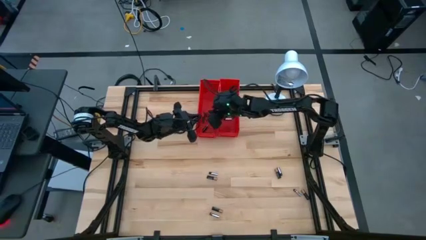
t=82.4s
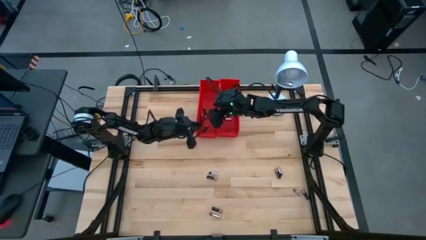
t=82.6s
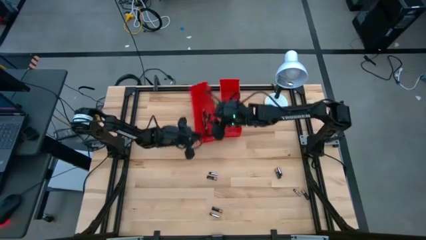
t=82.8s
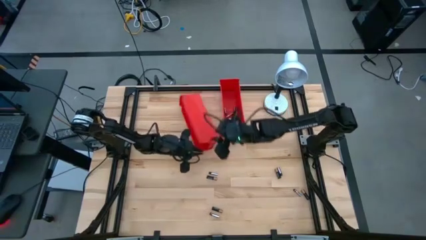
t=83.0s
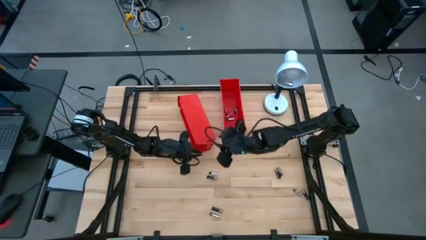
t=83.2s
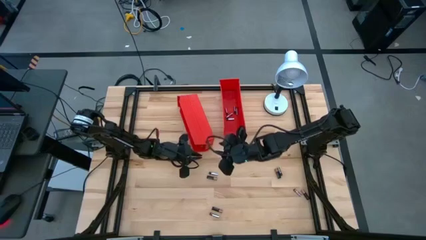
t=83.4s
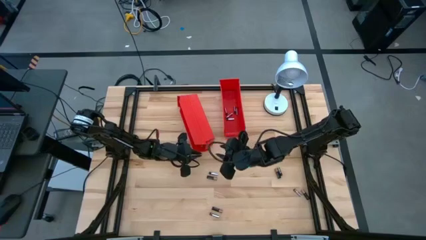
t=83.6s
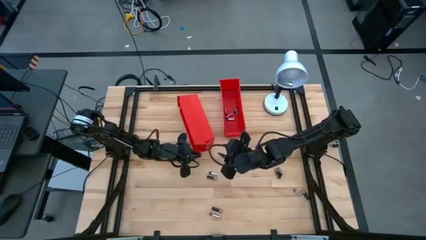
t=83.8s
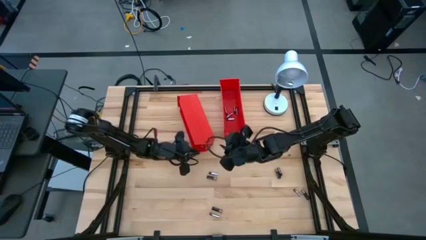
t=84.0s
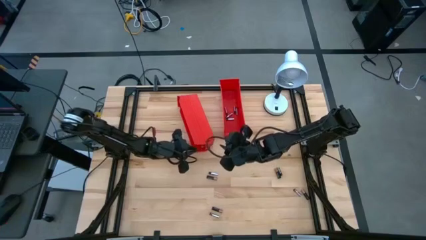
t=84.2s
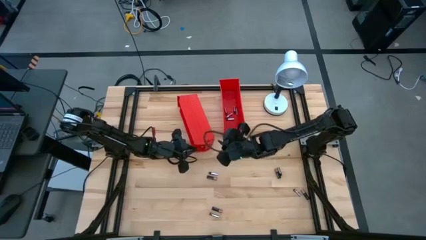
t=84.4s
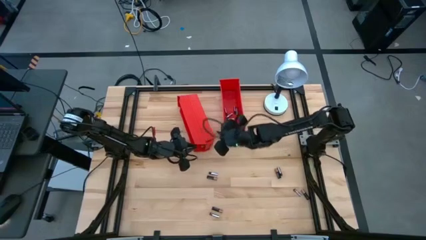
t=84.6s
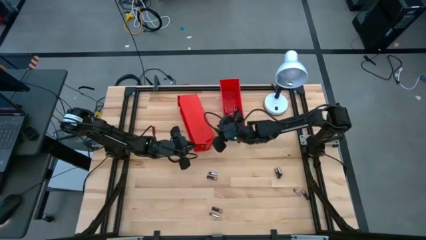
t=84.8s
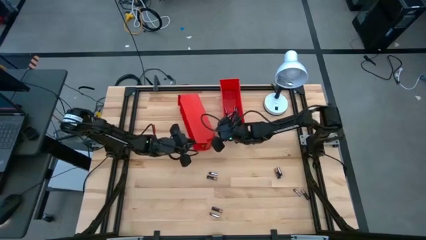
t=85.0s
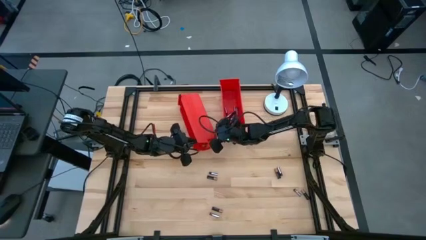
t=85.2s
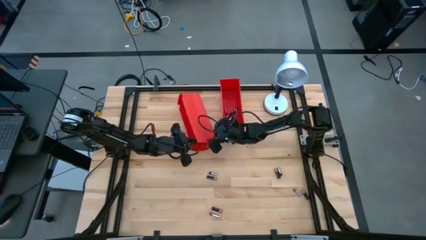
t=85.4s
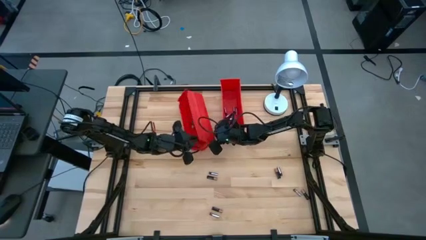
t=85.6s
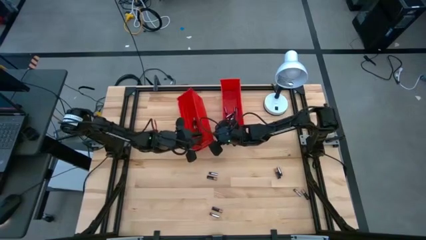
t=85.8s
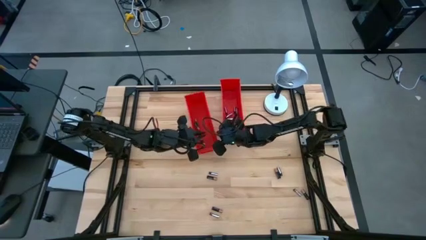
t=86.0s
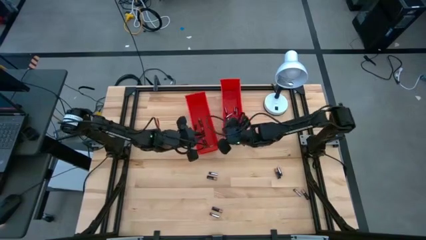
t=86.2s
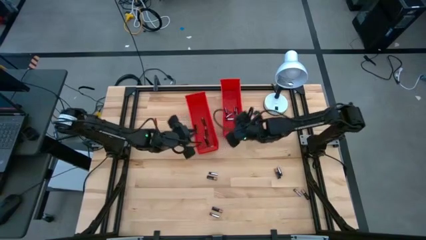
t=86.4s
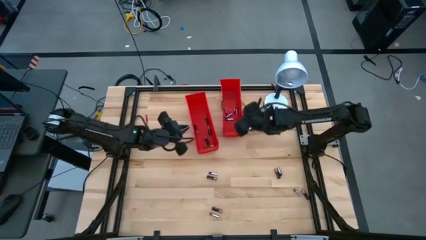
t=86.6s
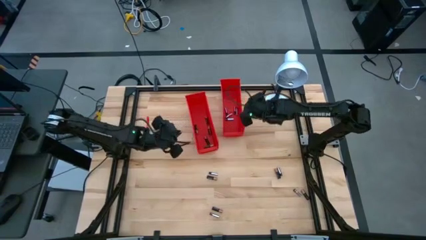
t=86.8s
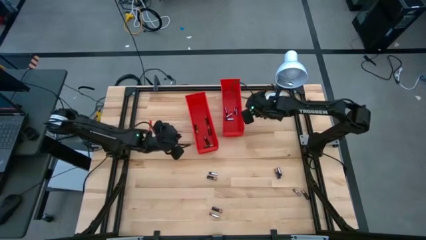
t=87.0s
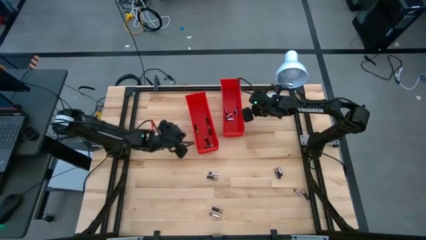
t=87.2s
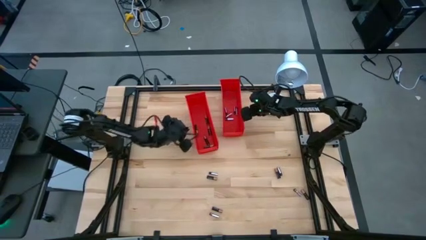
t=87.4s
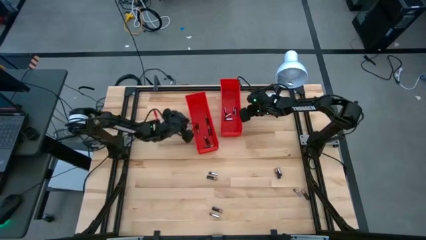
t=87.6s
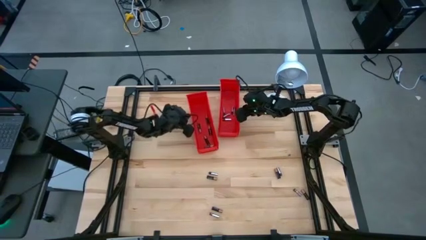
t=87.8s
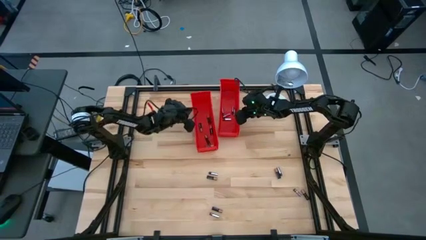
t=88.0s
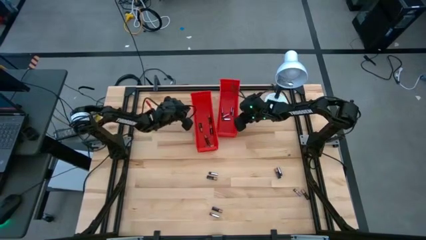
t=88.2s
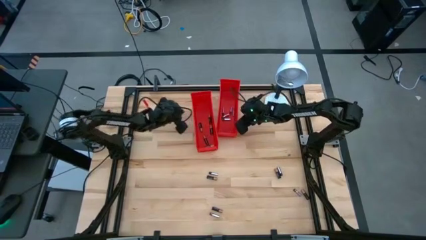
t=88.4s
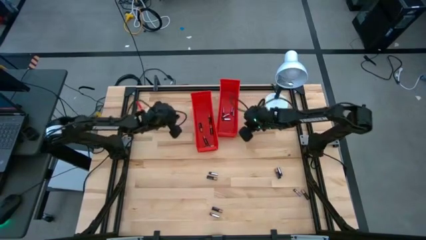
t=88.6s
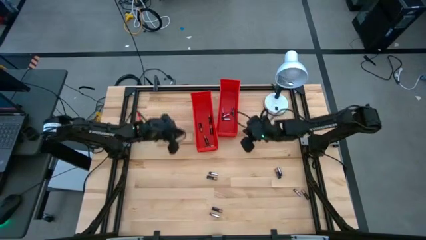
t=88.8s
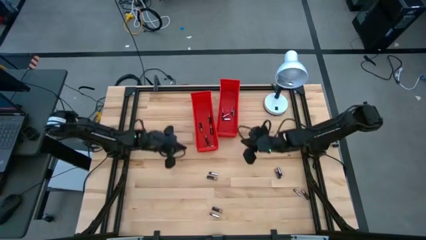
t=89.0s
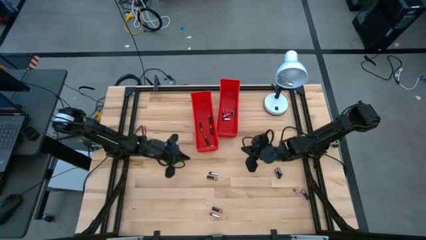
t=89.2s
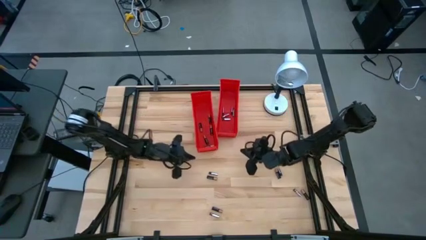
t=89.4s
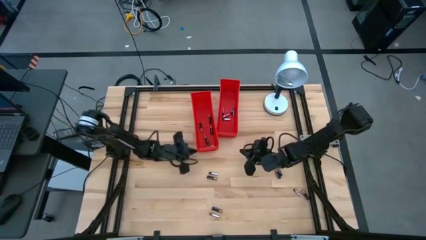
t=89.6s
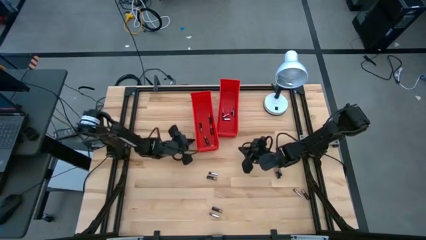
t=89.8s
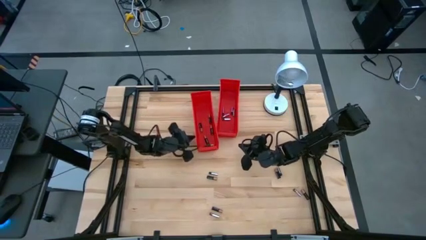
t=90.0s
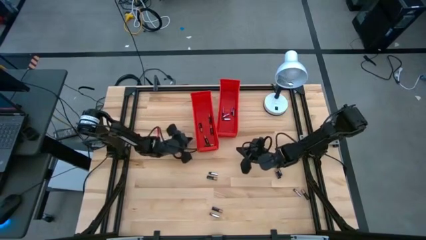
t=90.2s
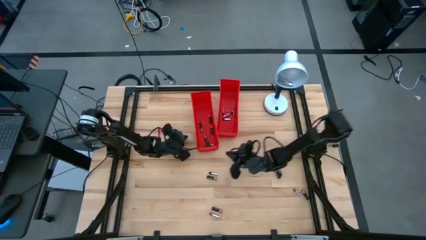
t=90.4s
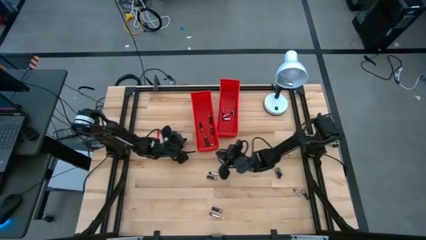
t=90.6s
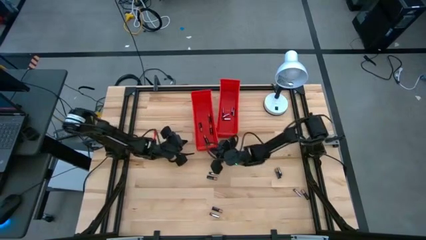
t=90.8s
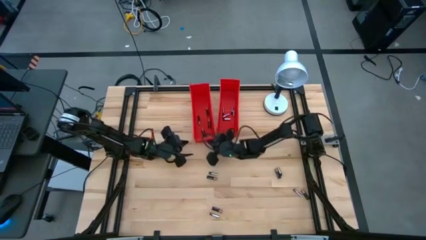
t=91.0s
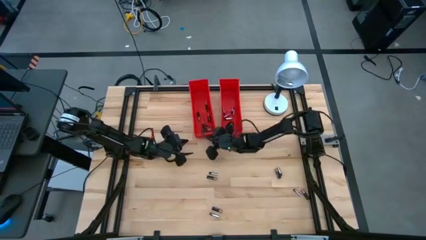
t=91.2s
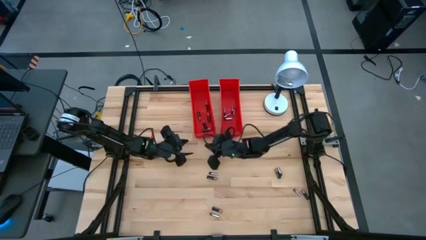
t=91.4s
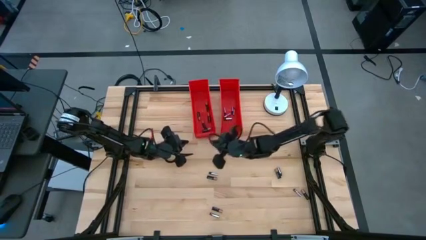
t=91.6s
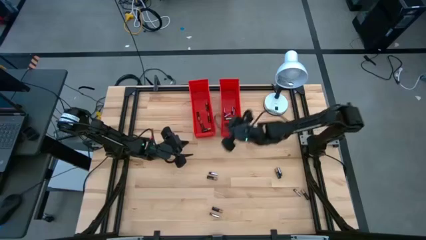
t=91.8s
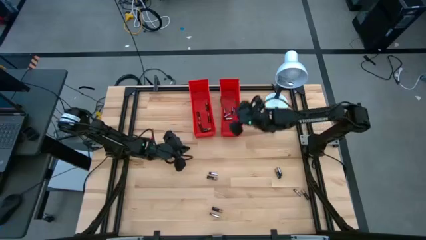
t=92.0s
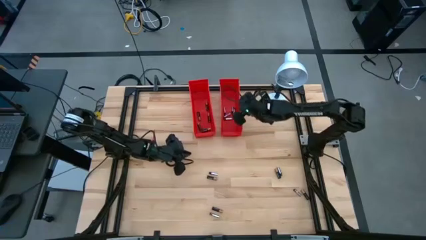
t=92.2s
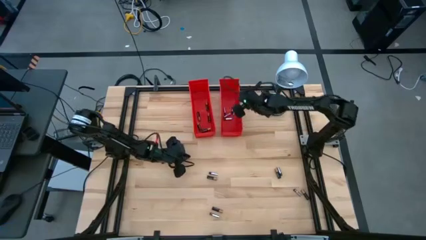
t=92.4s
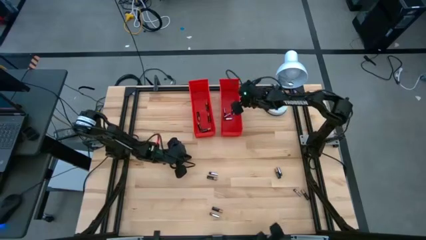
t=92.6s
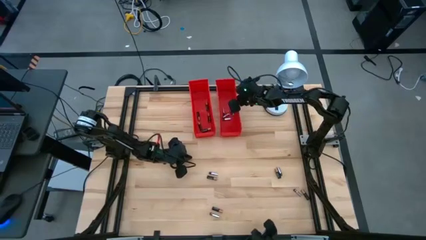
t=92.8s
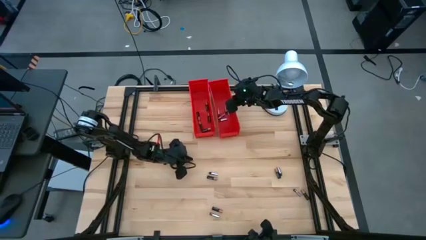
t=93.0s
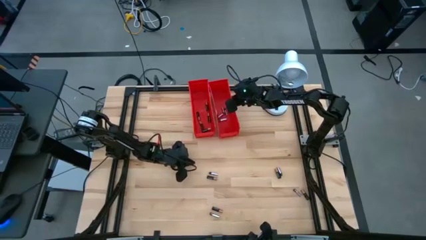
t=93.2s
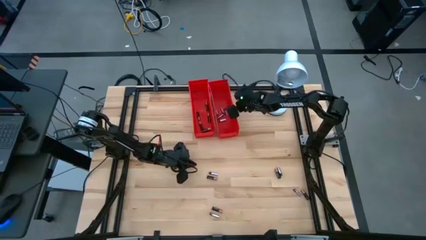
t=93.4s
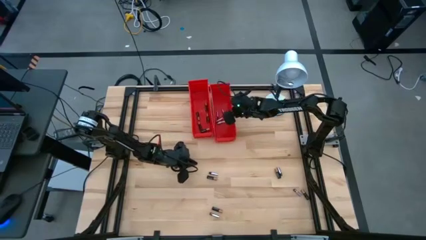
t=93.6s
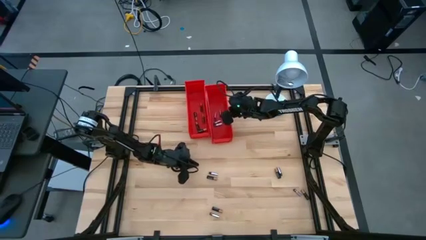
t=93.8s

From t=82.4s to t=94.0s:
Task: Sort batteries
Adjust the red bins

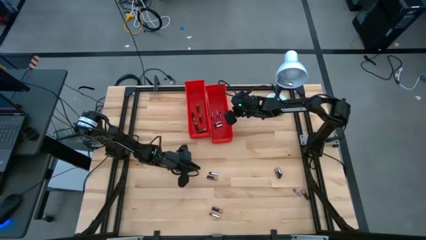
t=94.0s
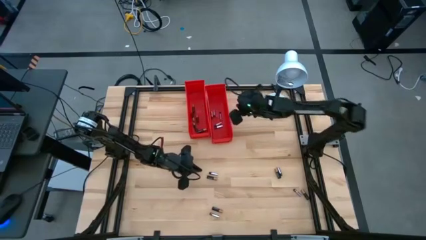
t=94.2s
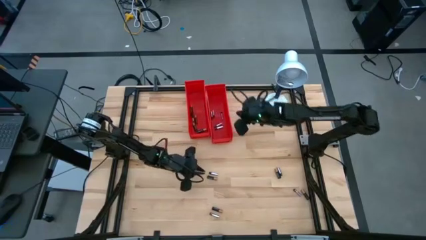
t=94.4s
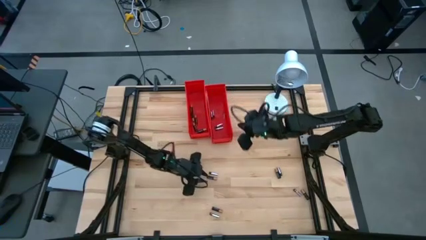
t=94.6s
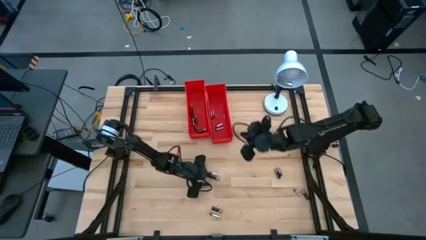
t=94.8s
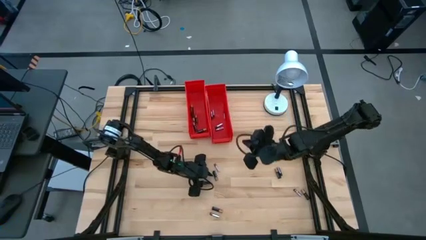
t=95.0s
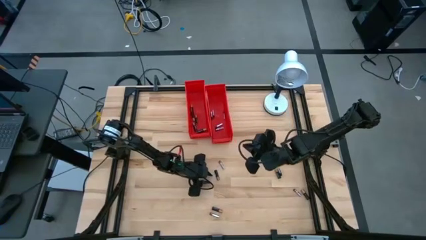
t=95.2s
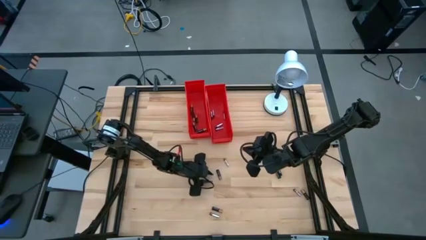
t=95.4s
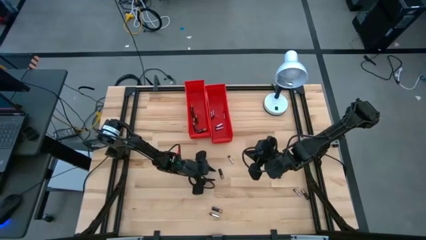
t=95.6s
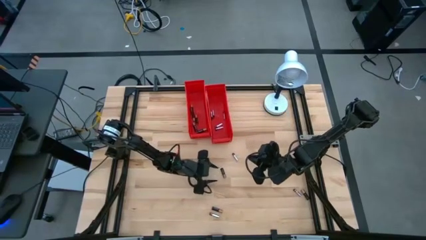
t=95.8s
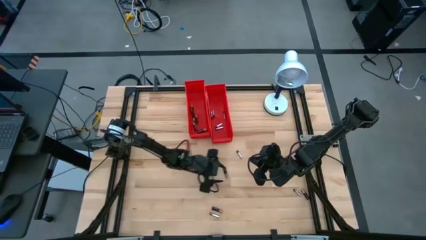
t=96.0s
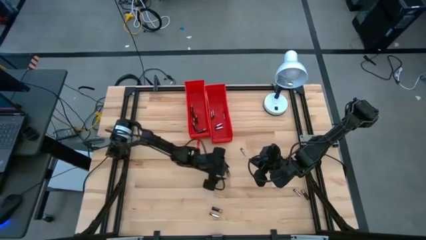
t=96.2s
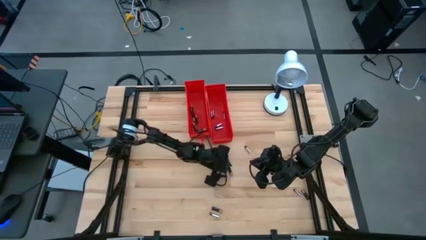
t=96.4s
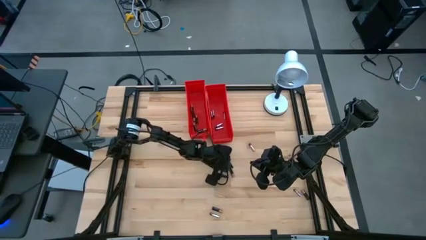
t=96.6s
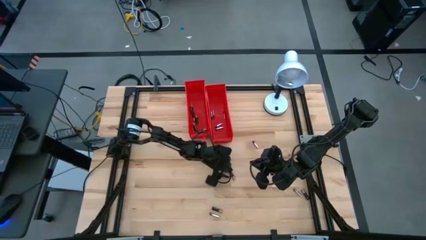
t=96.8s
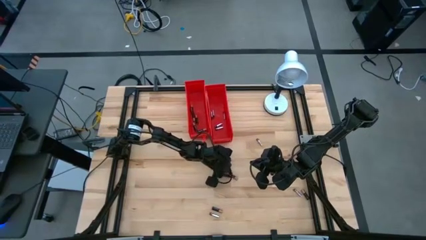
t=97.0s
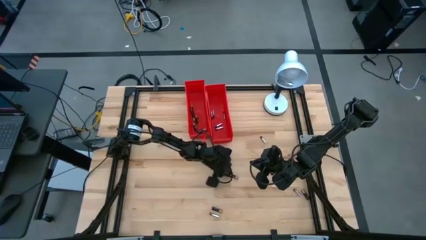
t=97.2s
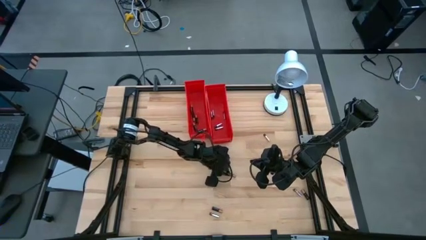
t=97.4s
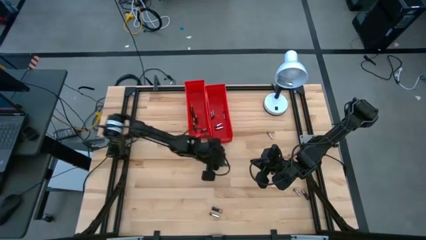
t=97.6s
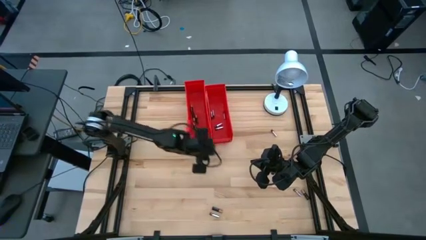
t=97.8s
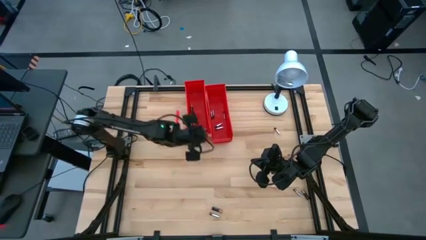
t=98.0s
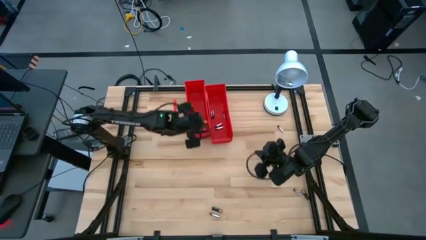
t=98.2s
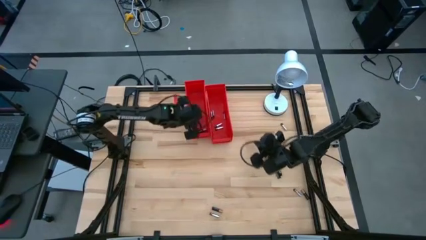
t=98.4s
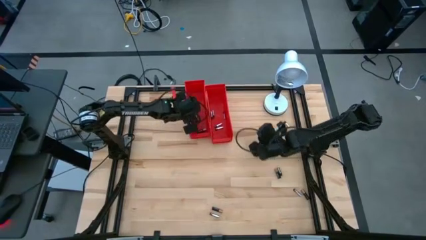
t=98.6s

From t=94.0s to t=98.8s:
Put the black battery into the left red bin
